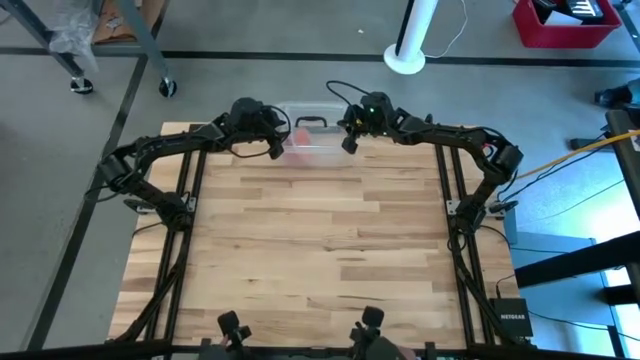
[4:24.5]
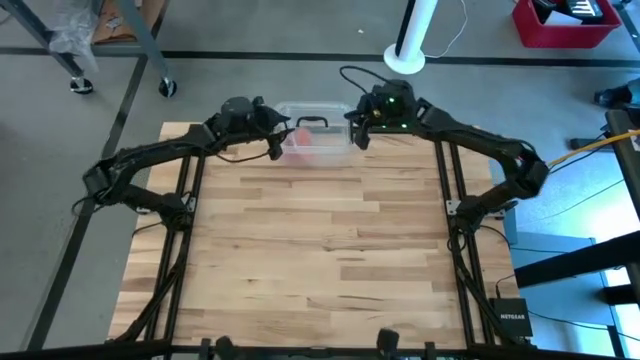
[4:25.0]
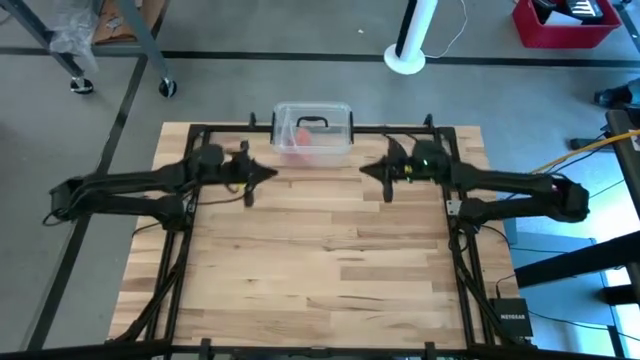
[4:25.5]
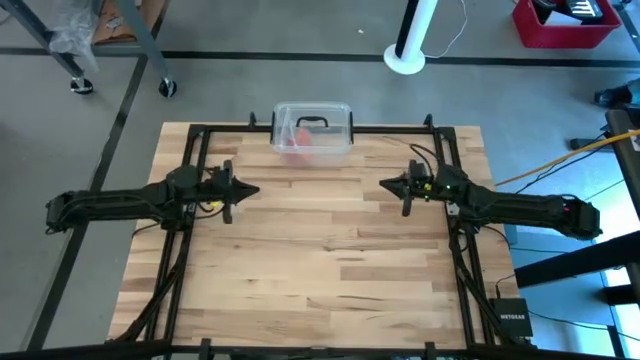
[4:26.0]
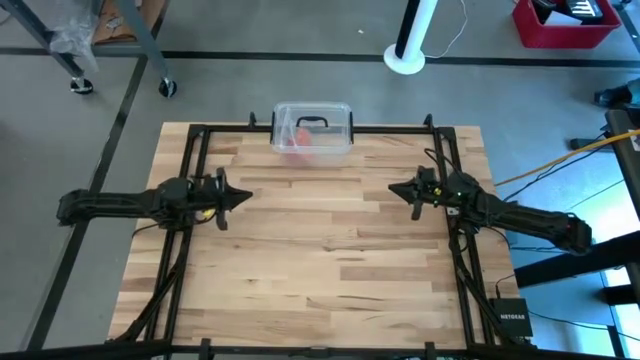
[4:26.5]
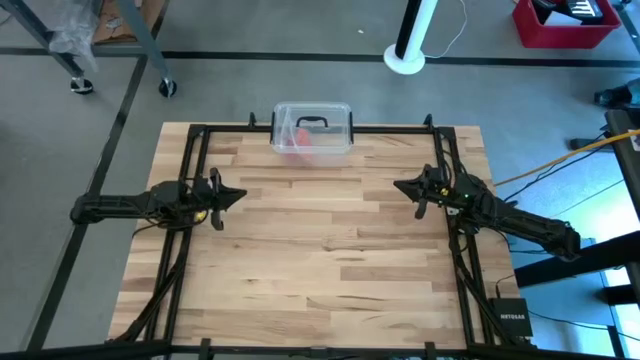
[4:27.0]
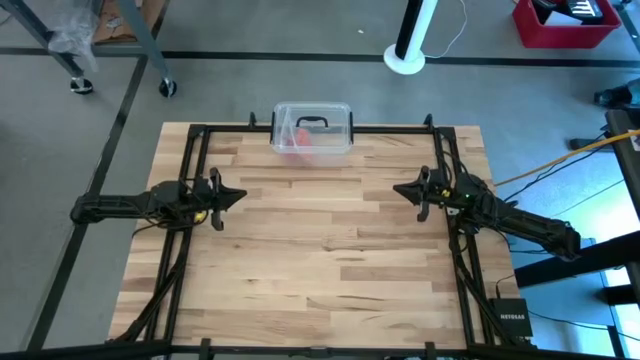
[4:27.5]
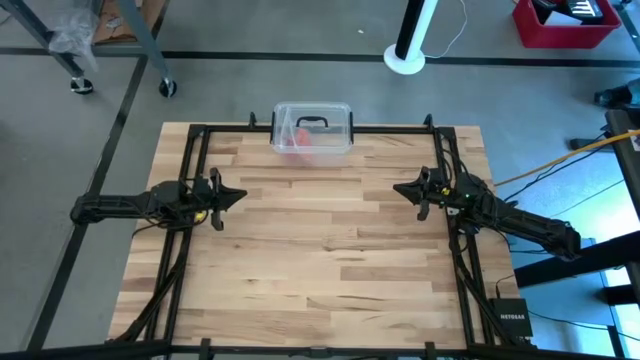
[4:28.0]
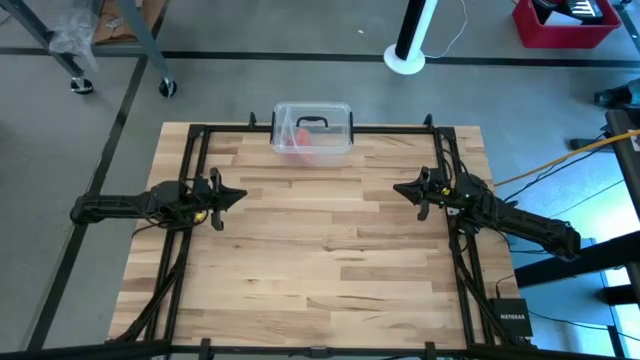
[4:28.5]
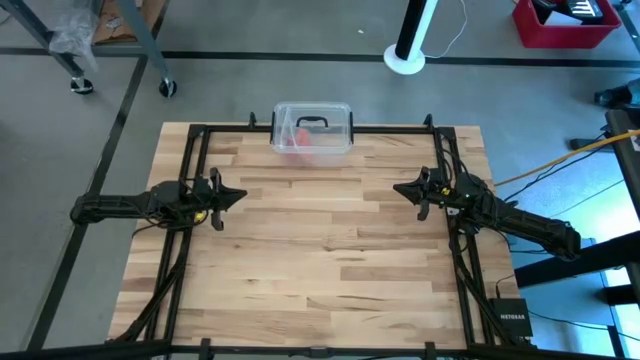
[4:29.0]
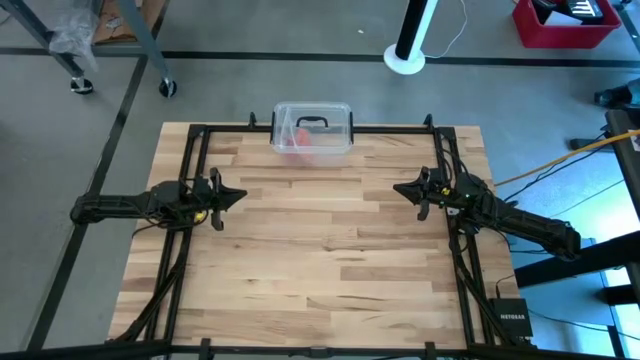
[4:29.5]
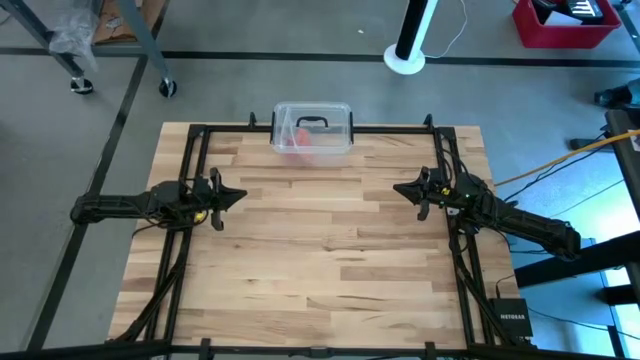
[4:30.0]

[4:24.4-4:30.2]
Task: Roll bandage
Return to Home Position

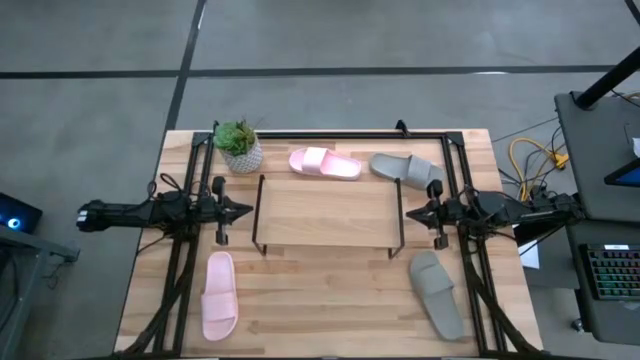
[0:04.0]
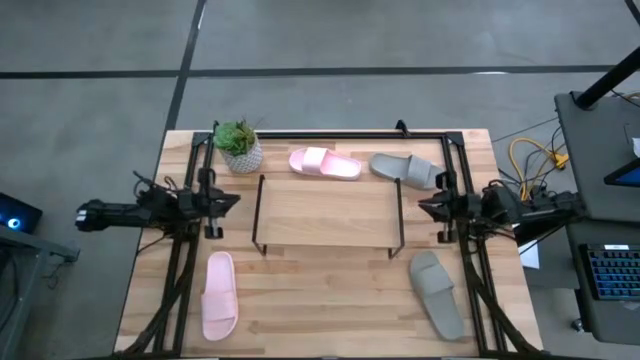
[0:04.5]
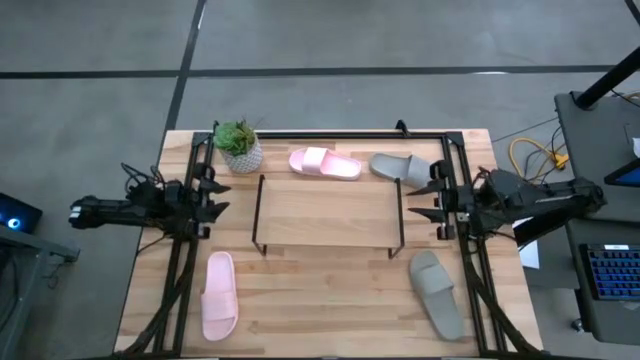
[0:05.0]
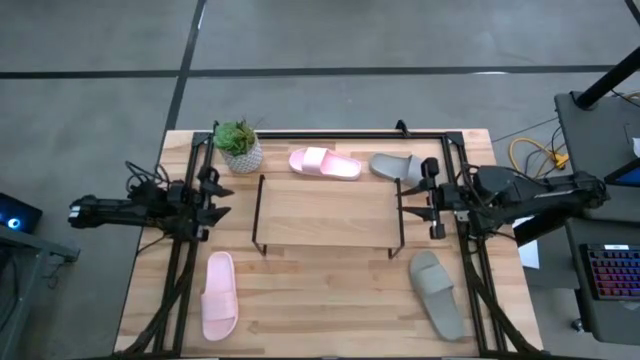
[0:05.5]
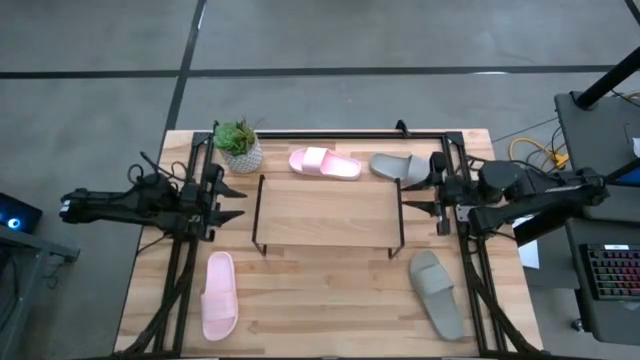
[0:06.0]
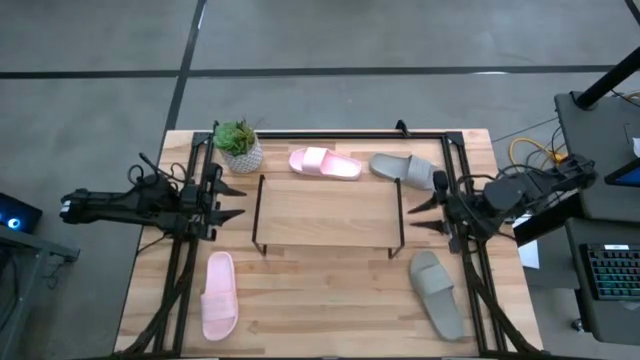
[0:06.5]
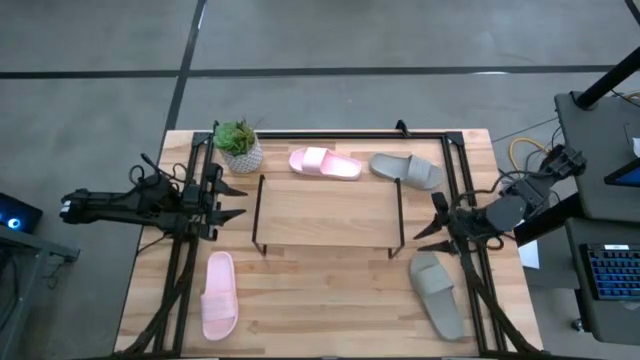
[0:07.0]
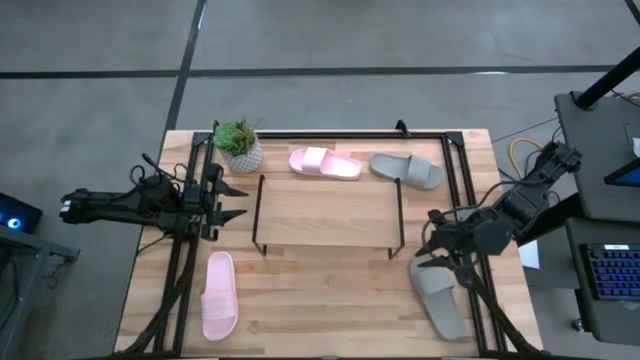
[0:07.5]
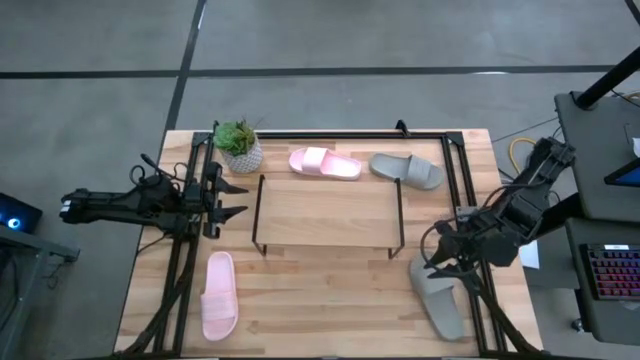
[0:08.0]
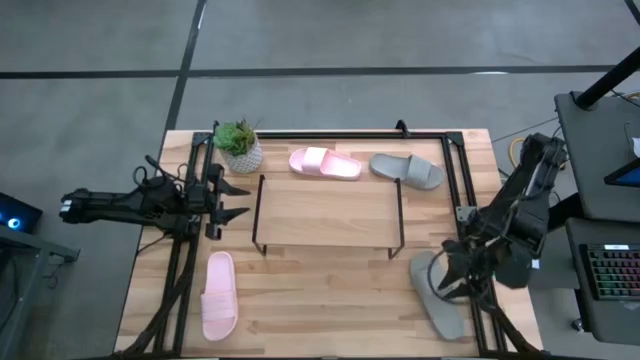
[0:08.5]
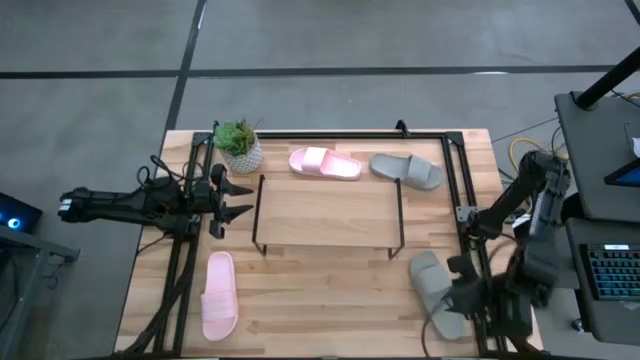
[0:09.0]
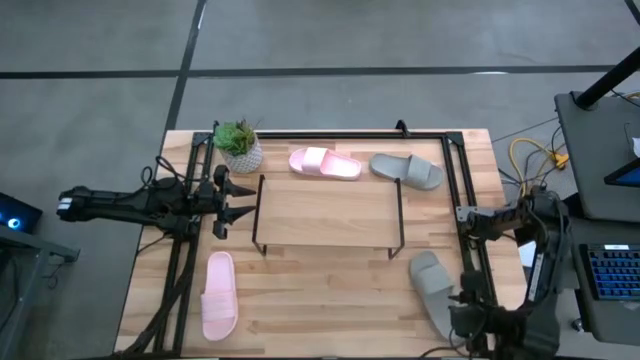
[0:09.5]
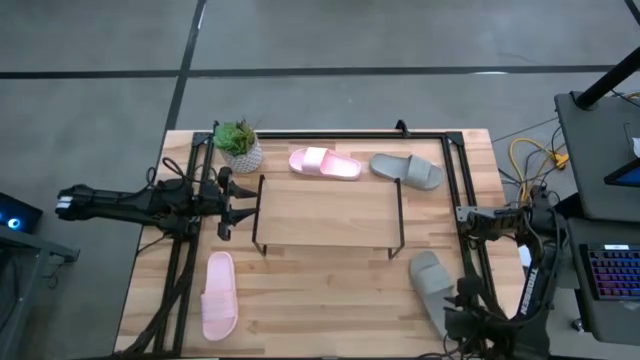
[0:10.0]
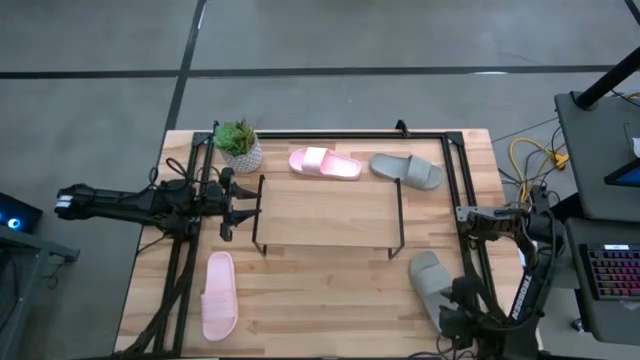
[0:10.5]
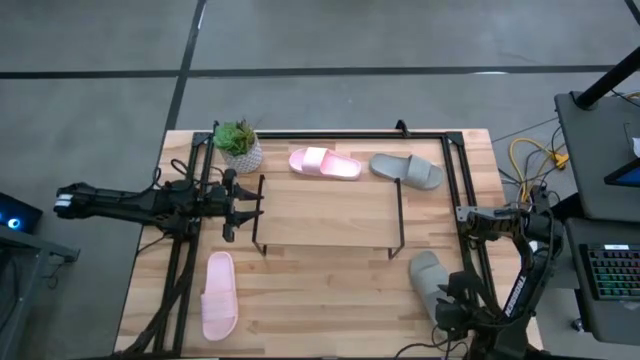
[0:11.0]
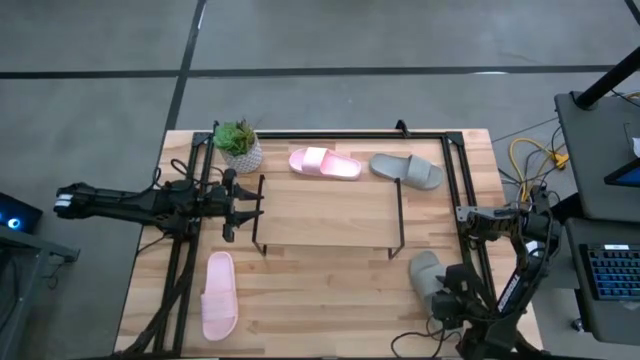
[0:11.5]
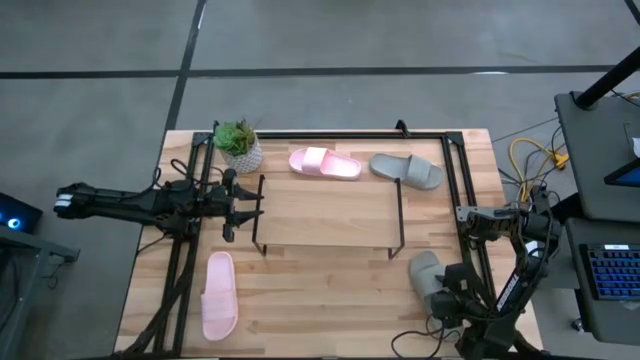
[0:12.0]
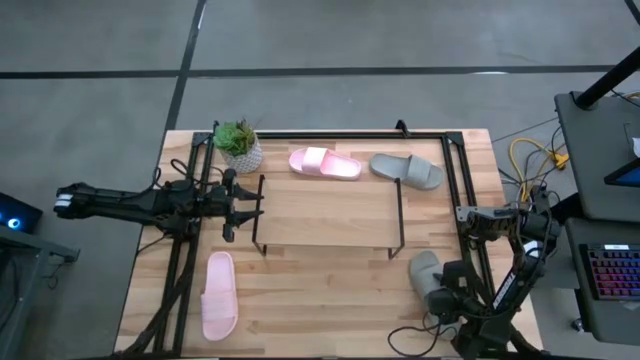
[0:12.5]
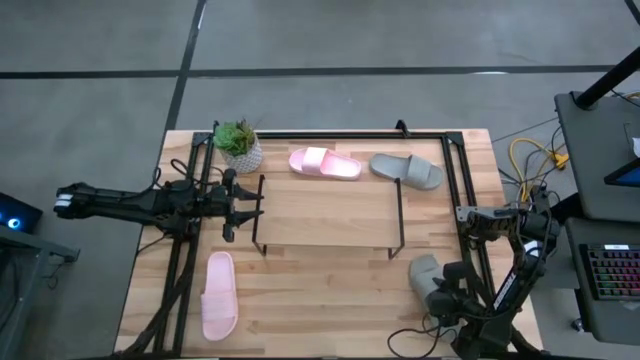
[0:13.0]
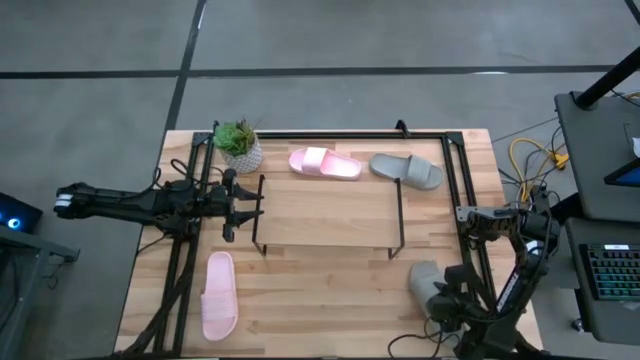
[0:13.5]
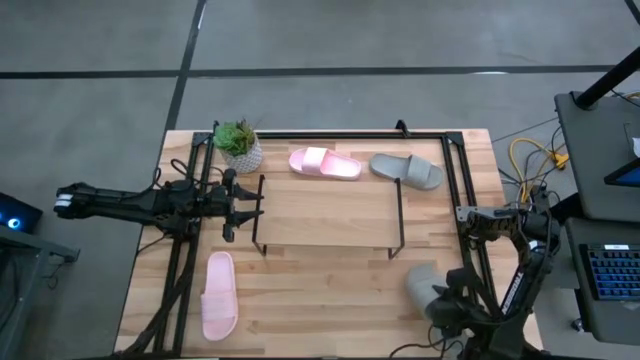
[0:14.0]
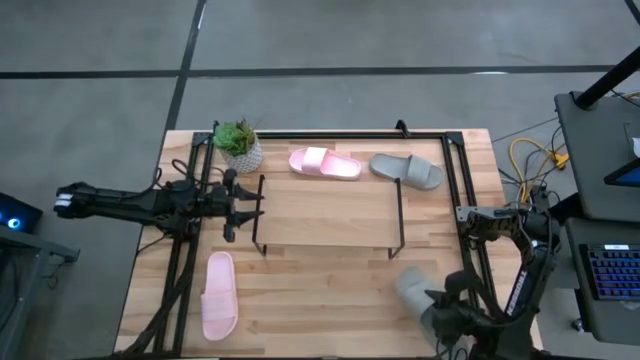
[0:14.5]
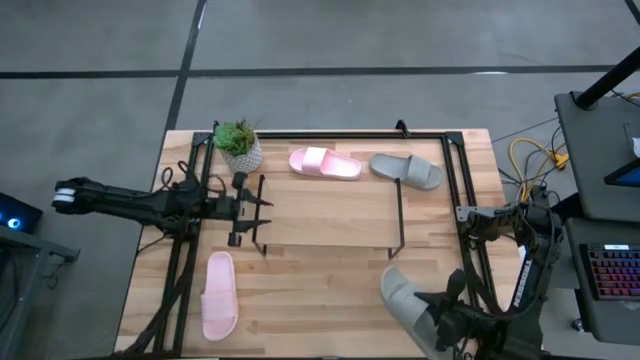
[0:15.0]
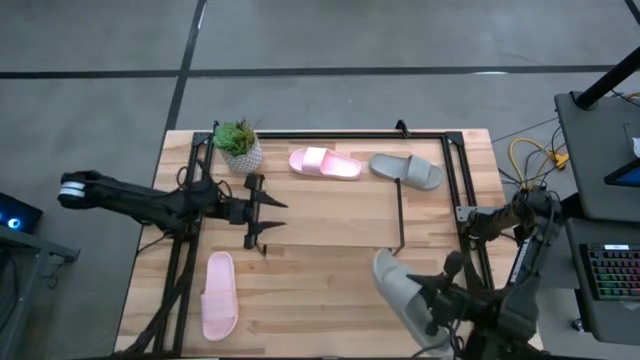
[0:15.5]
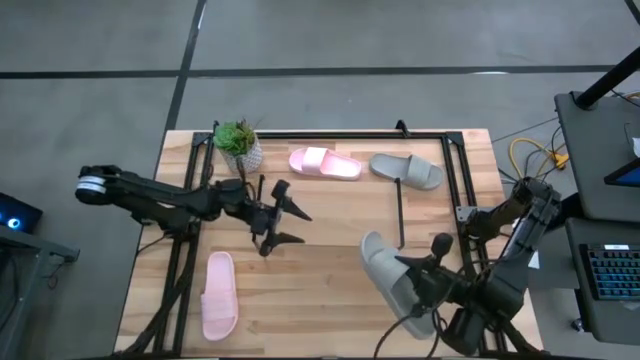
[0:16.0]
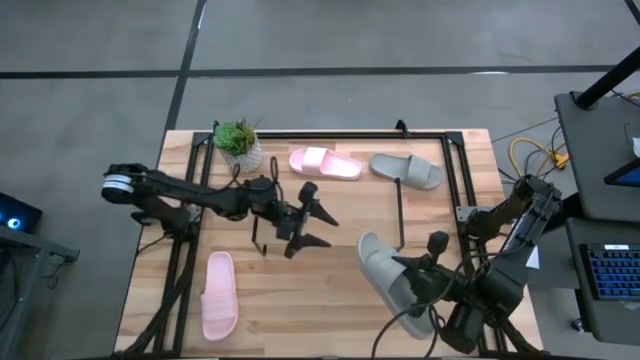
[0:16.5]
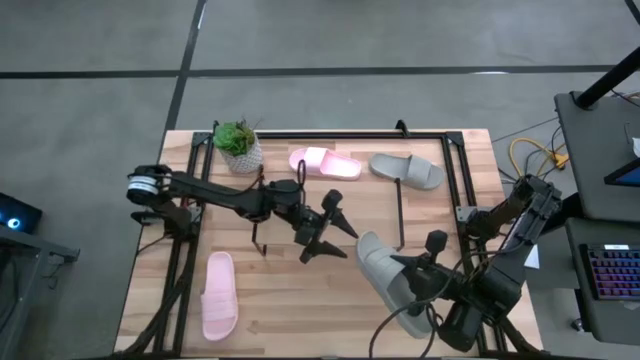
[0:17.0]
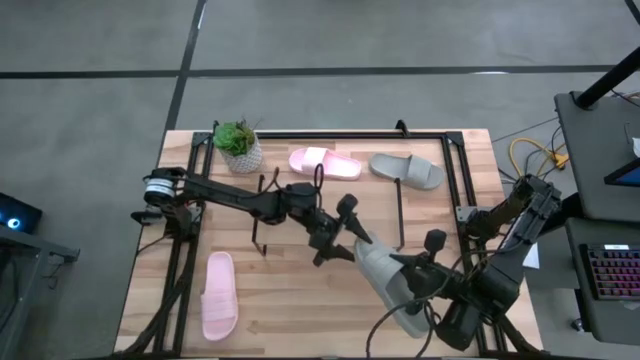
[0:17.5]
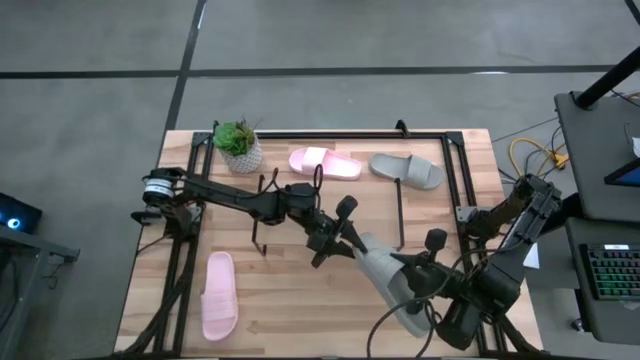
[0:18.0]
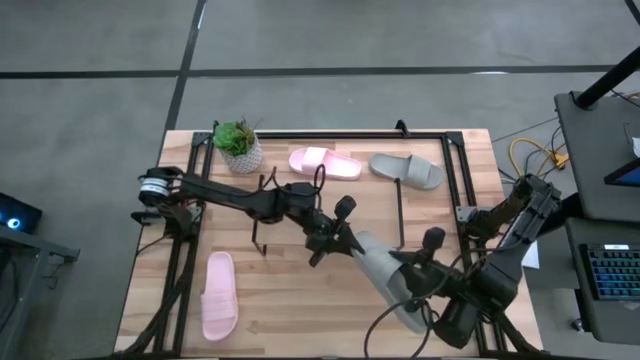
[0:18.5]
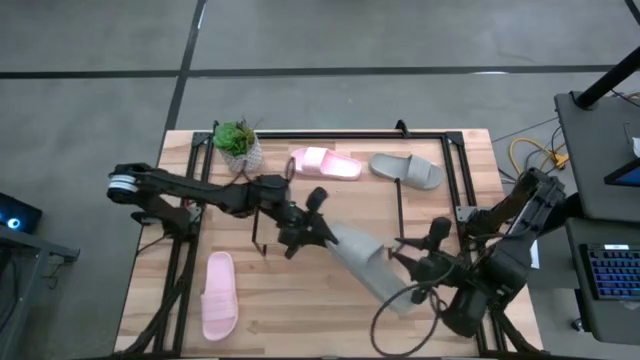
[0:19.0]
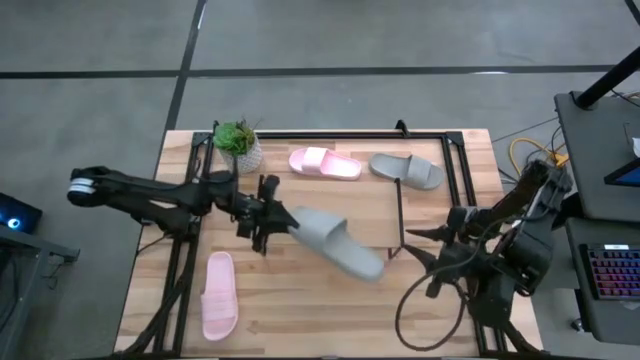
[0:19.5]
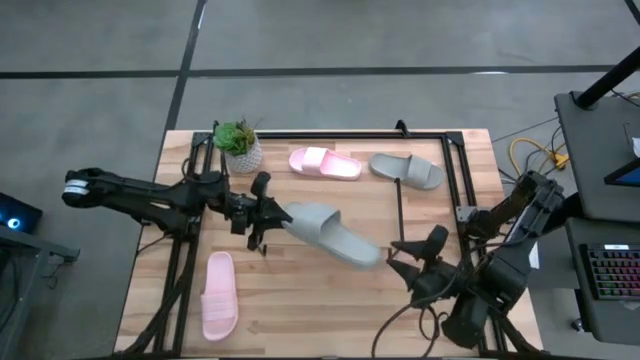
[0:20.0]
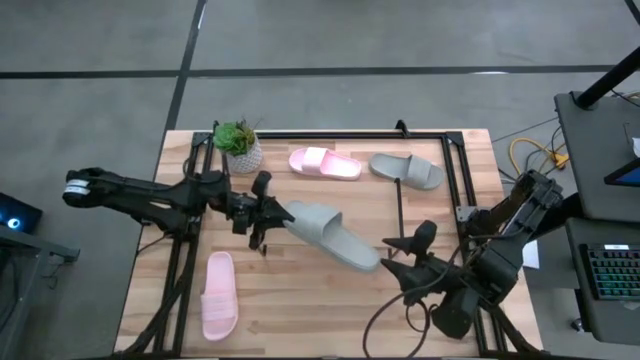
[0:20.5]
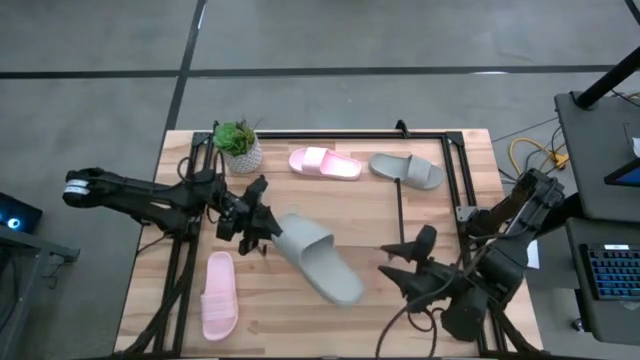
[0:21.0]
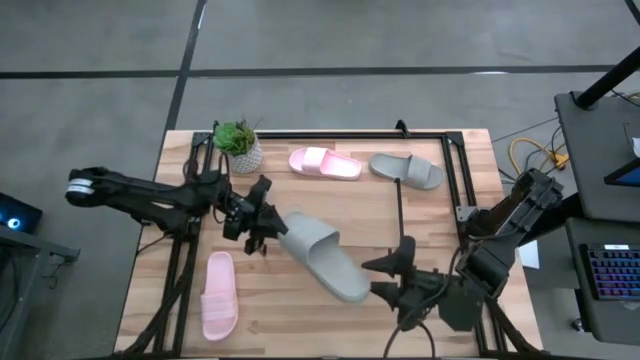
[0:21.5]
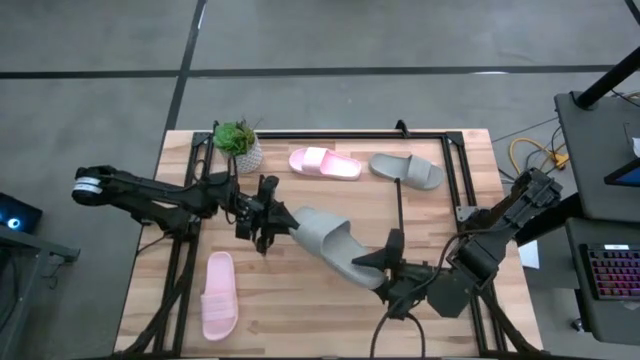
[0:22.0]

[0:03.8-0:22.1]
Task: Pick and place slides into the shelf
Put the bottom gray slide on the shelf
